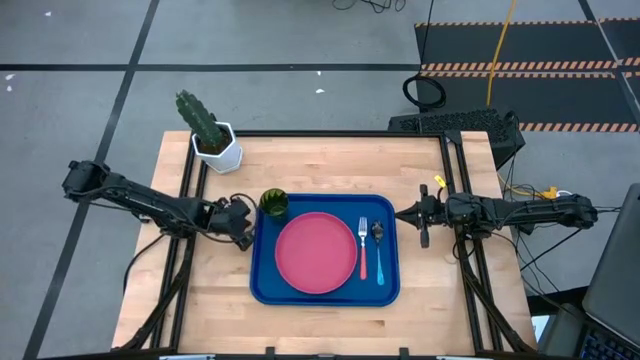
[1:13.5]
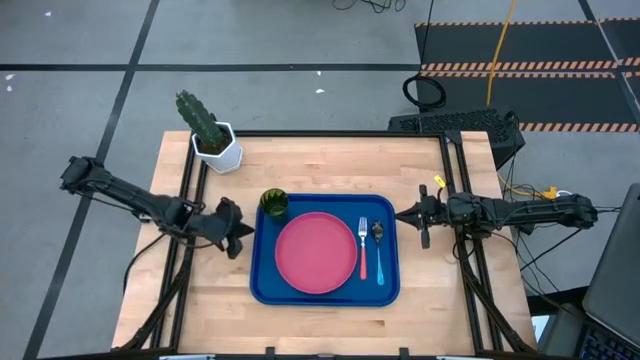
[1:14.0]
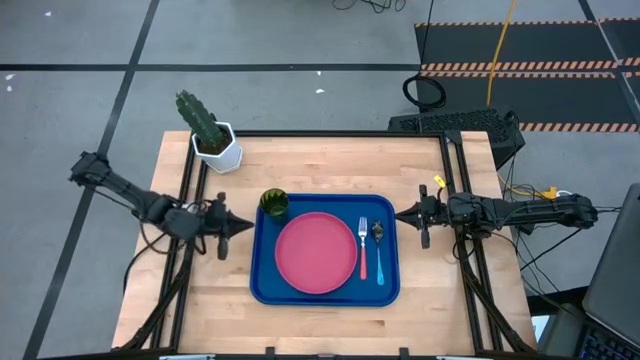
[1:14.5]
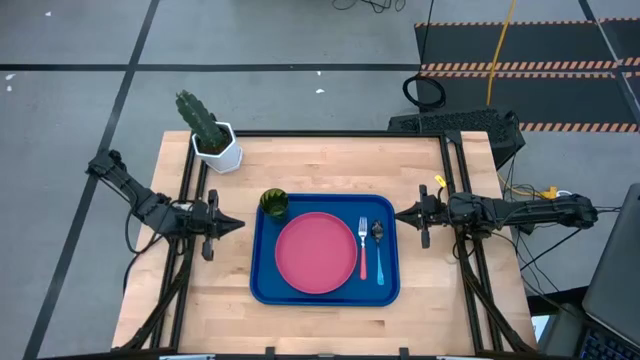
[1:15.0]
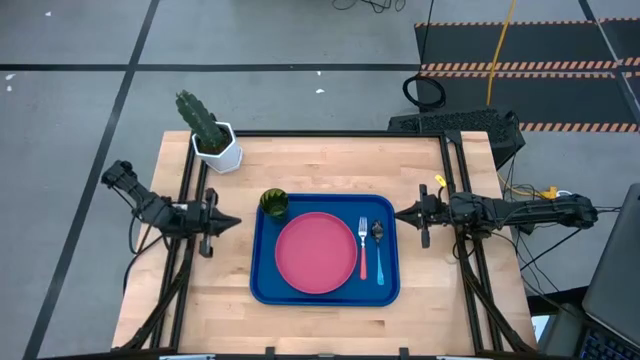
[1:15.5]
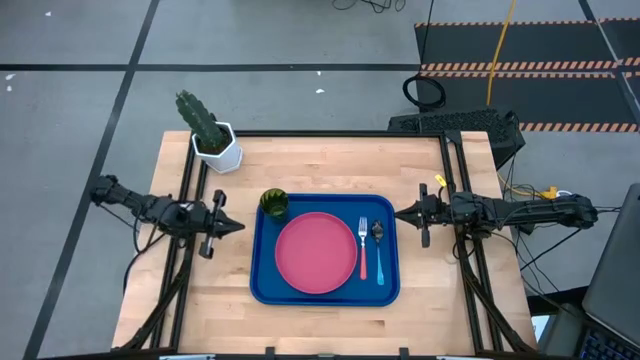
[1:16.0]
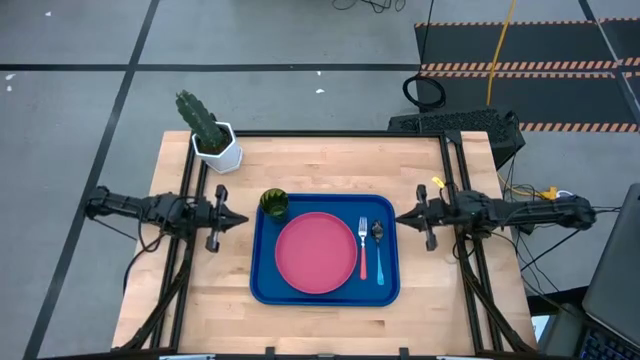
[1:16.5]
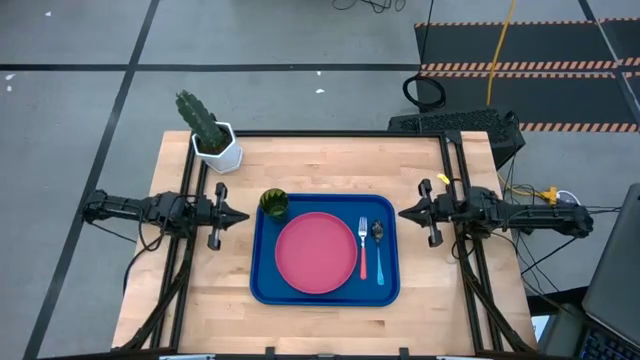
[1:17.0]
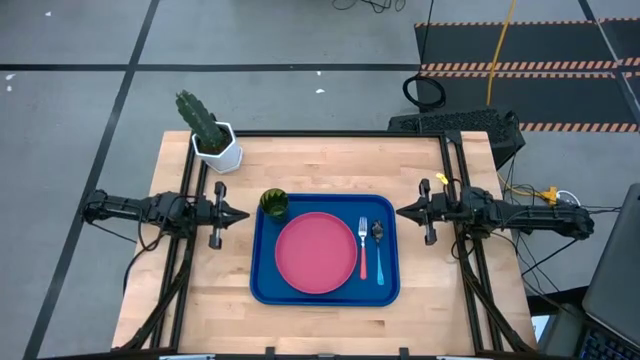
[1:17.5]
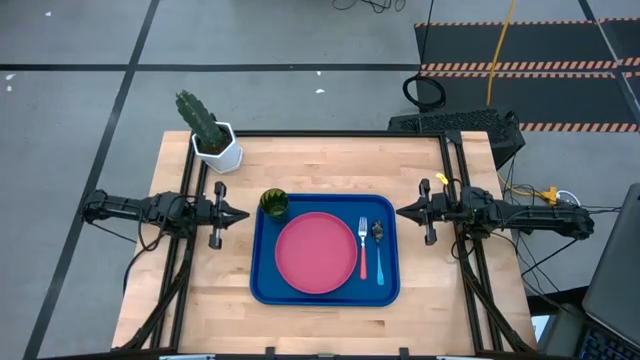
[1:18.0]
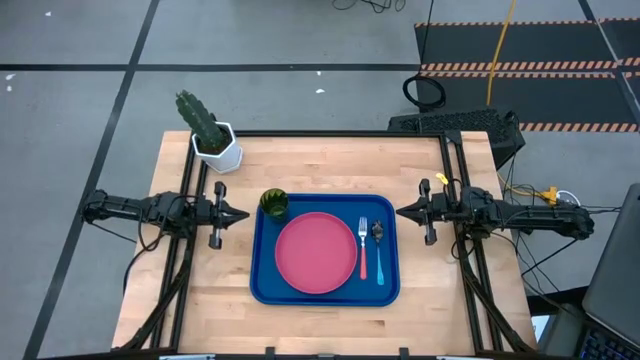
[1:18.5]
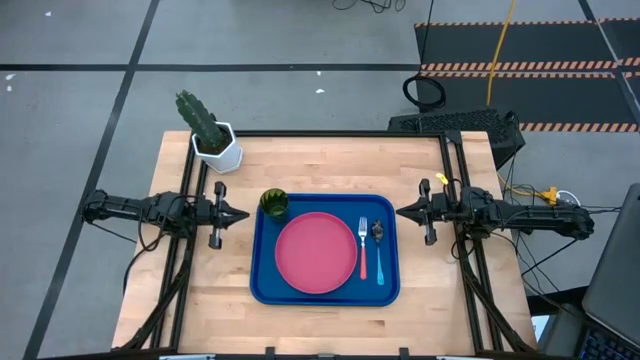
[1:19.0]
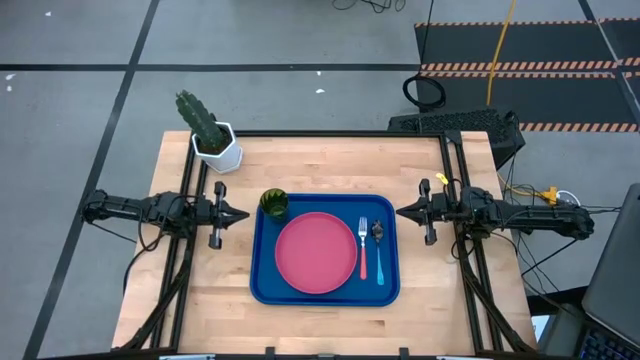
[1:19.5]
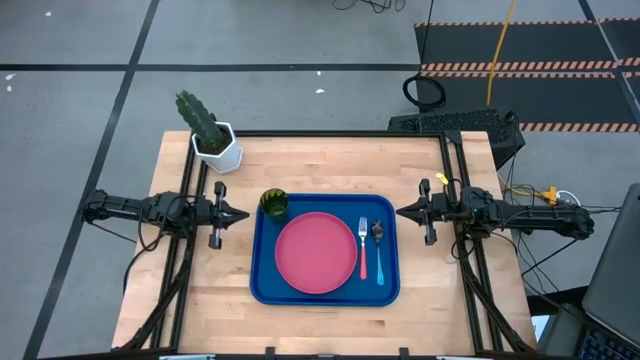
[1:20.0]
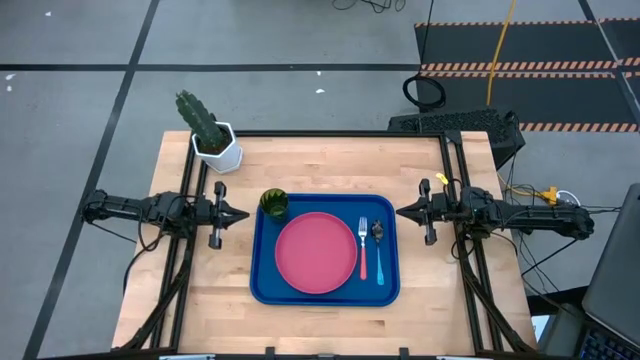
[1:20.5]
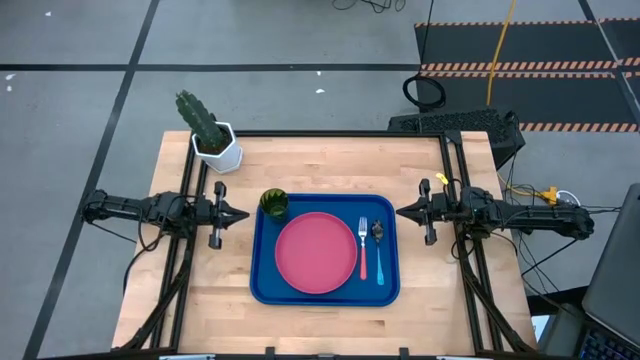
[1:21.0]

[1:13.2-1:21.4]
Task: Pick and place plate/cup/fork/spoon on tray
Return to Home Position

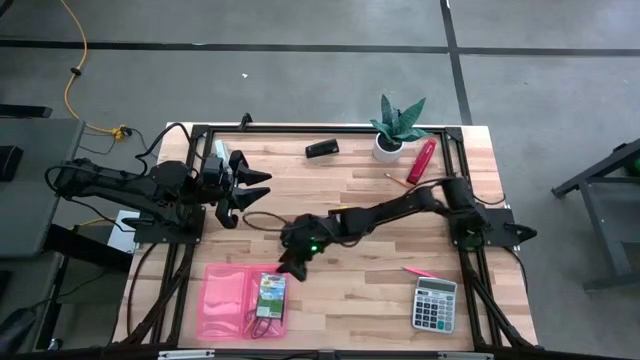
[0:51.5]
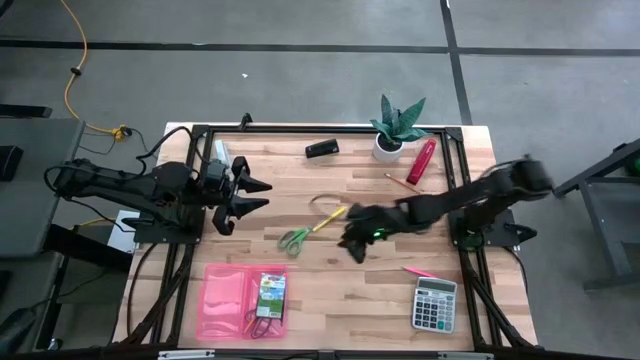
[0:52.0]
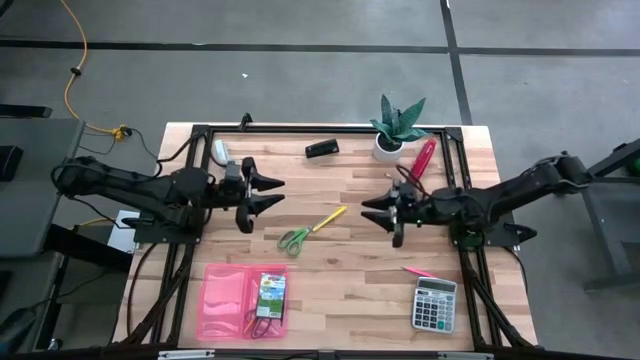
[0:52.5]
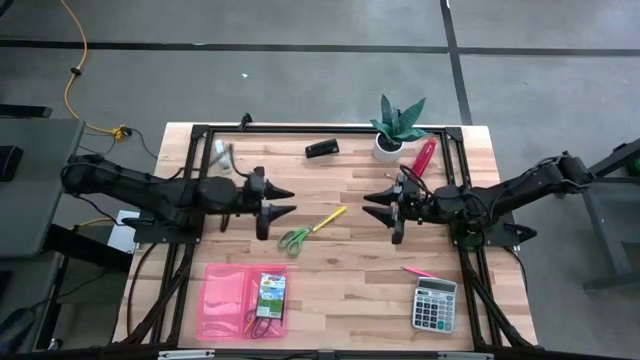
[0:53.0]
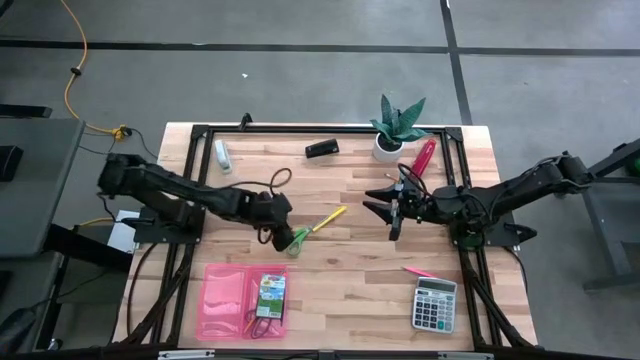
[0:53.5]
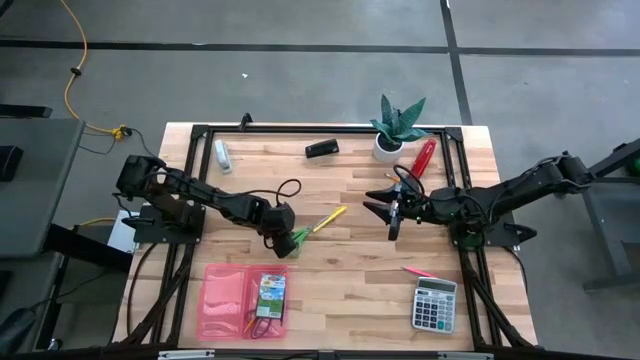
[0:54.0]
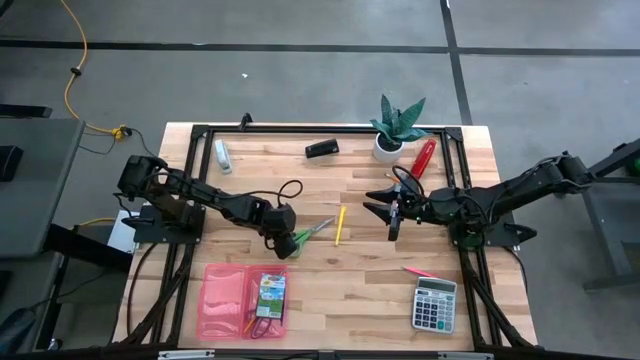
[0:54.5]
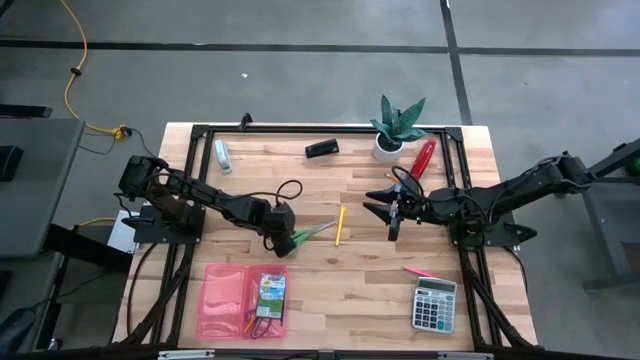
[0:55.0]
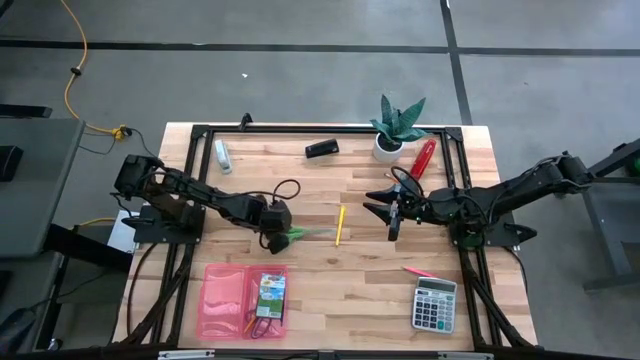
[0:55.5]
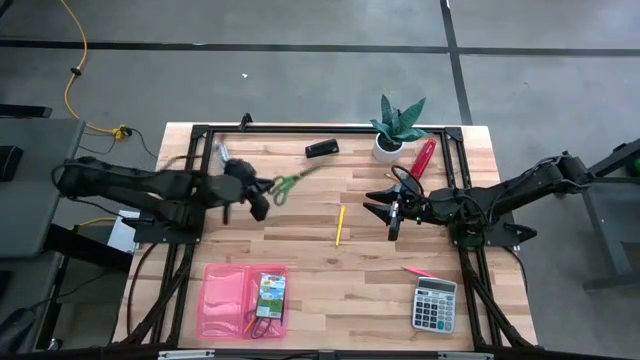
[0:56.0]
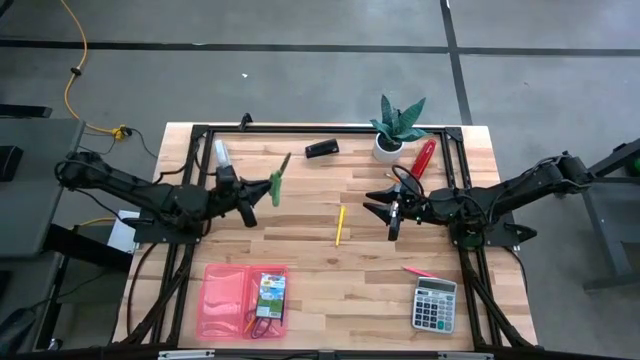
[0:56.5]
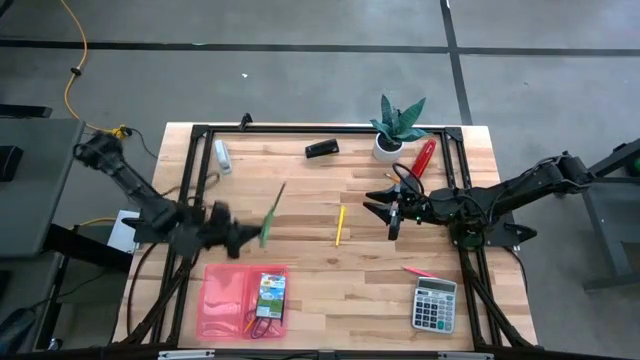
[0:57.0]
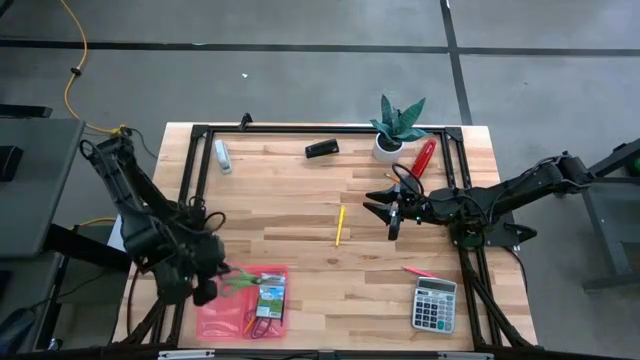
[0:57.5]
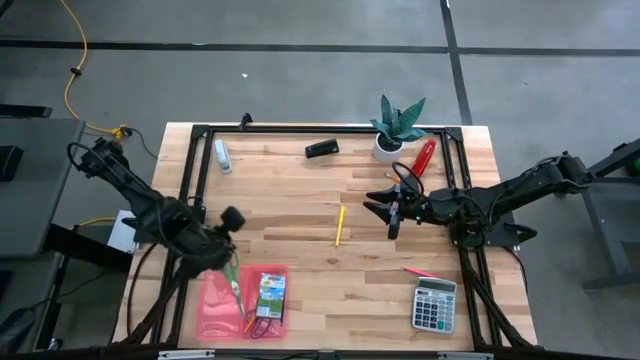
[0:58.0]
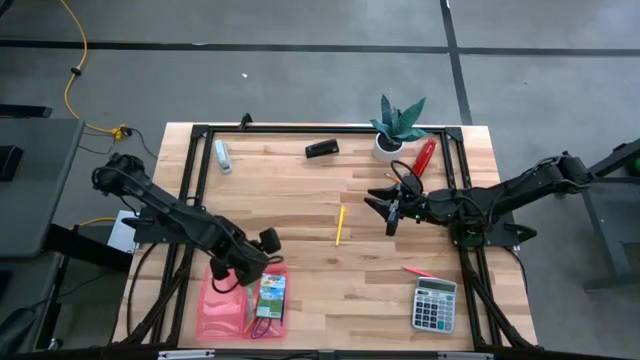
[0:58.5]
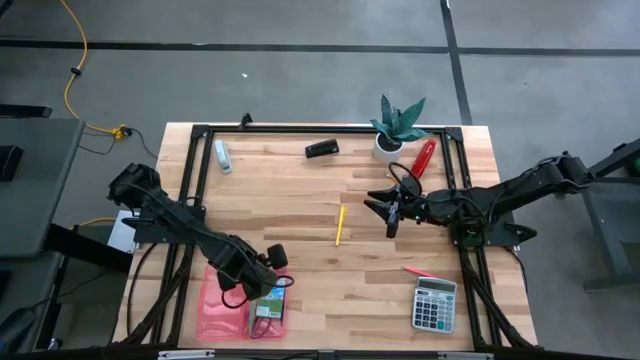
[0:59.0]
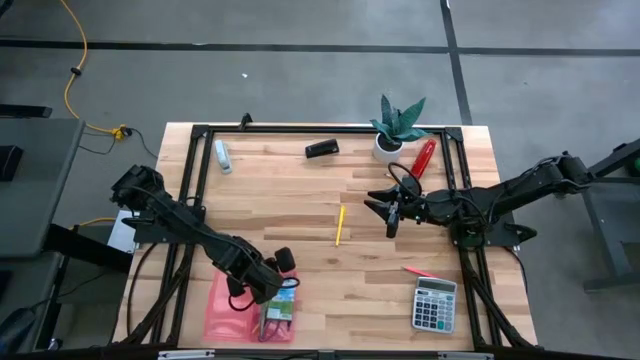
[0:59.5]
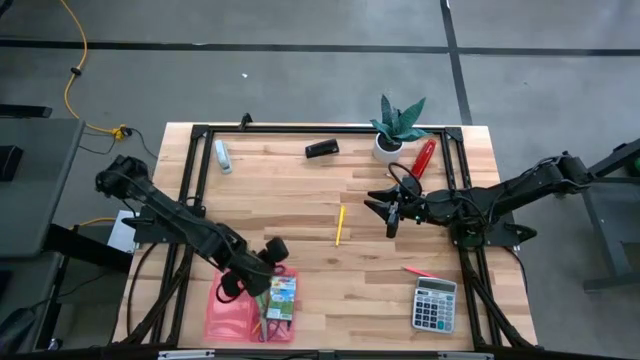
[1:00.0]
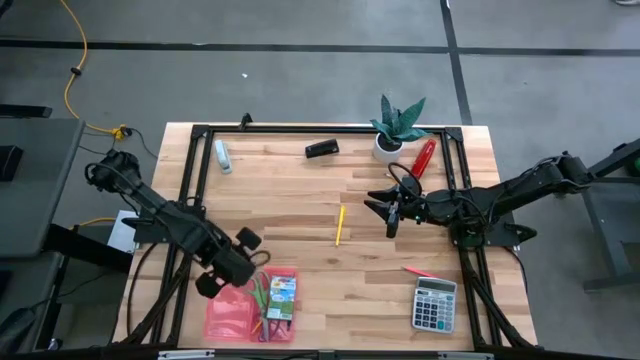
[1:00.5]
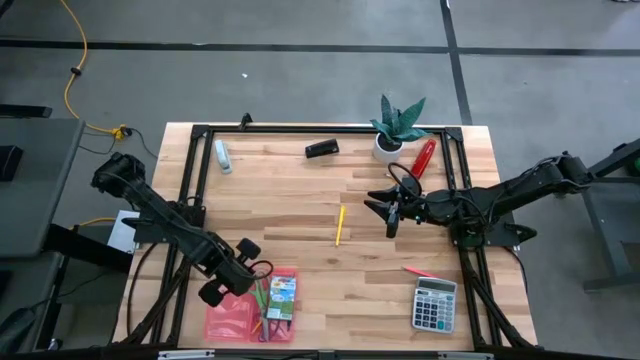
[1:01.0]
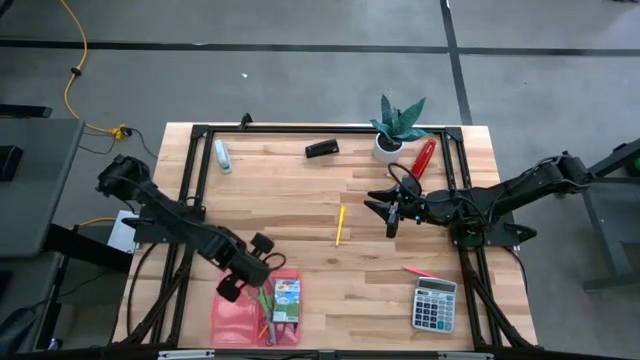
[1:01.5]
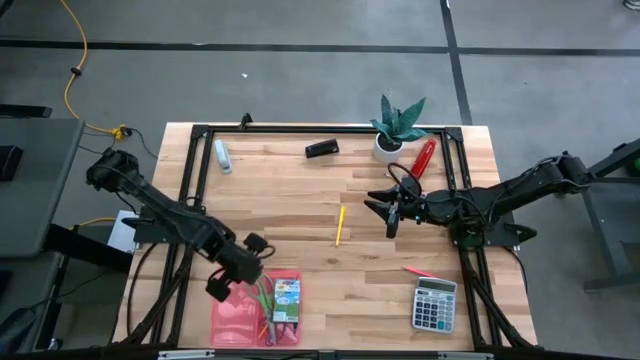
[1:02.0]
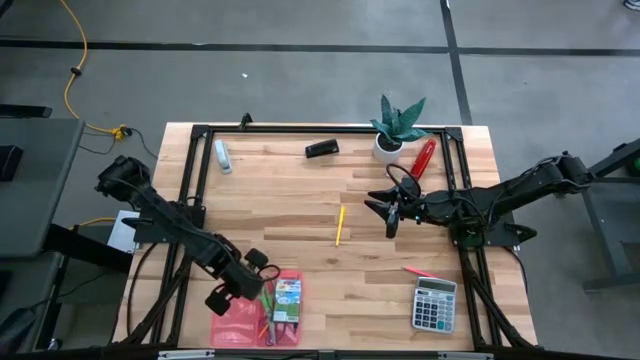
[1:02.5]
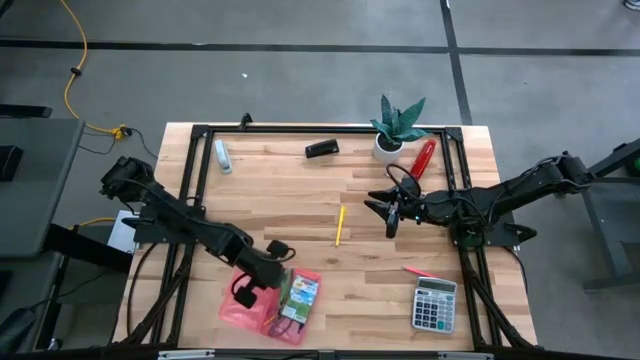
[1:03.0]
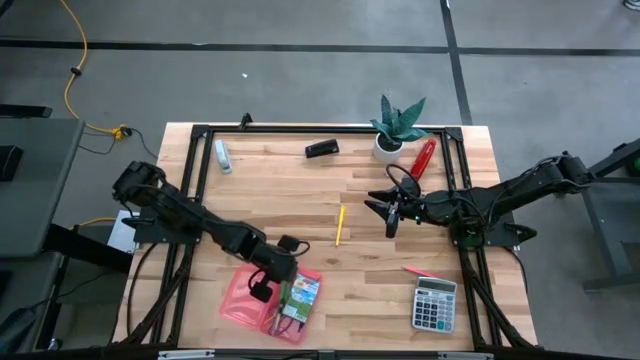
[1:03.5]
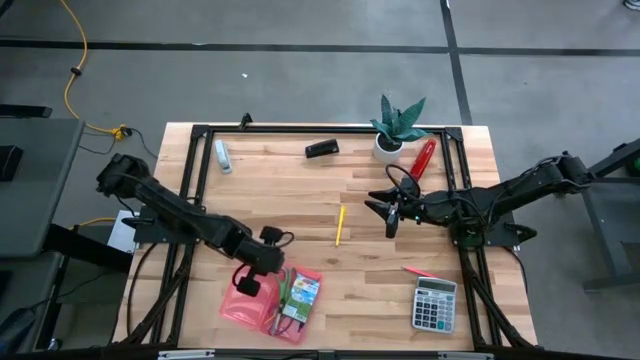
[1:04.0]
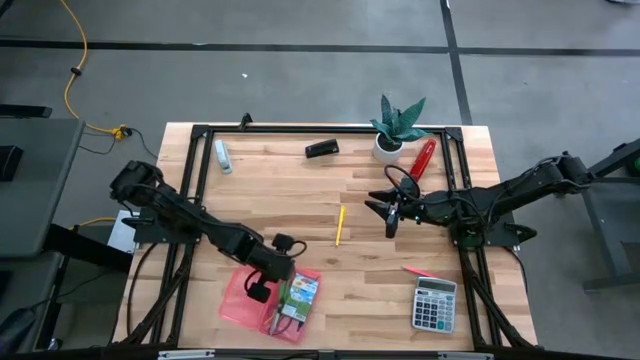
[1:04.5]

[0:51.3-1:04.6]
Task: Pack school essentials
Put the green scissors into the supply box
